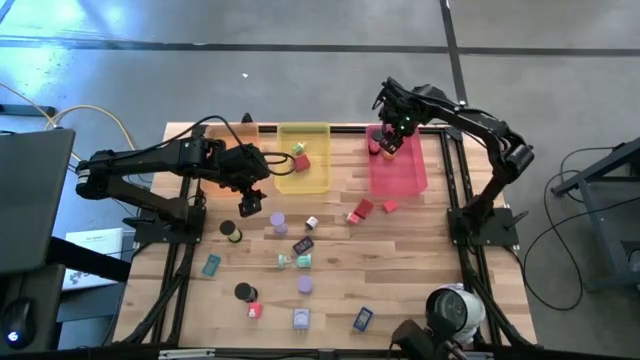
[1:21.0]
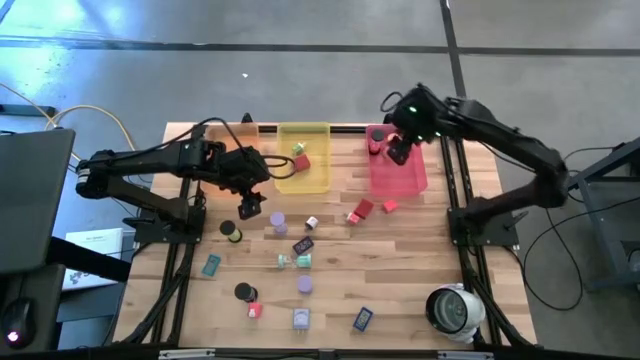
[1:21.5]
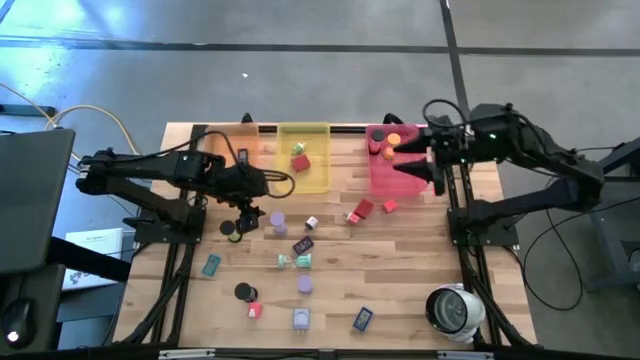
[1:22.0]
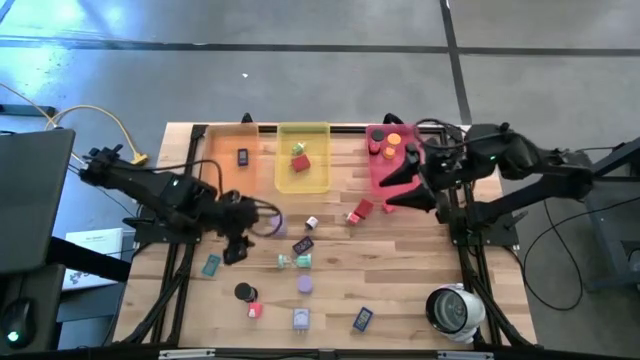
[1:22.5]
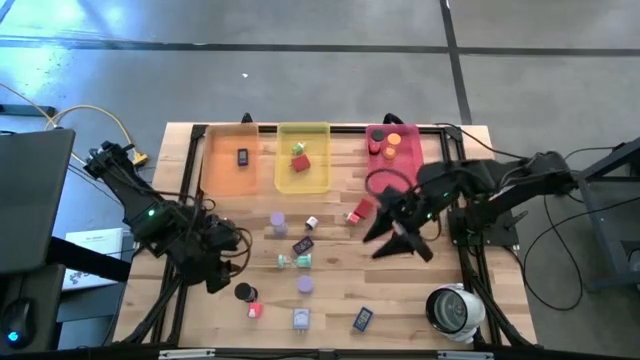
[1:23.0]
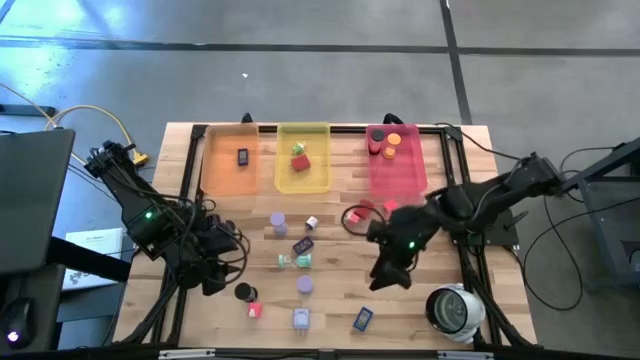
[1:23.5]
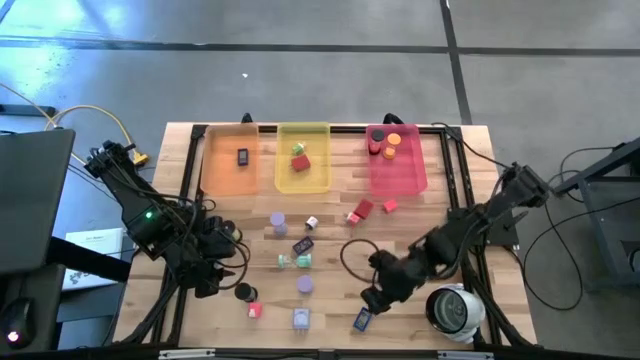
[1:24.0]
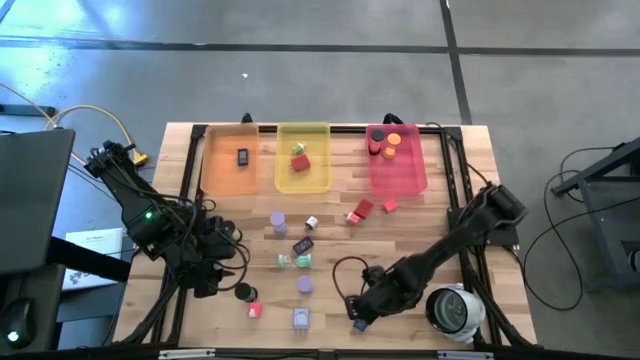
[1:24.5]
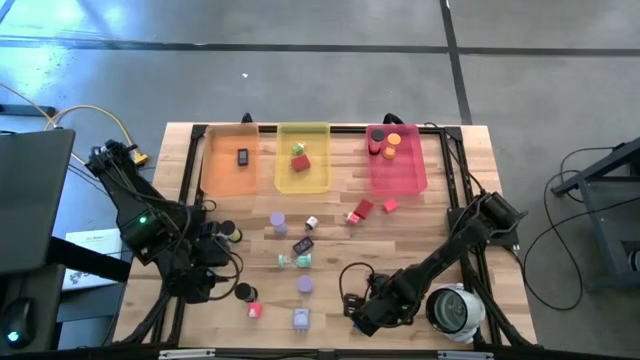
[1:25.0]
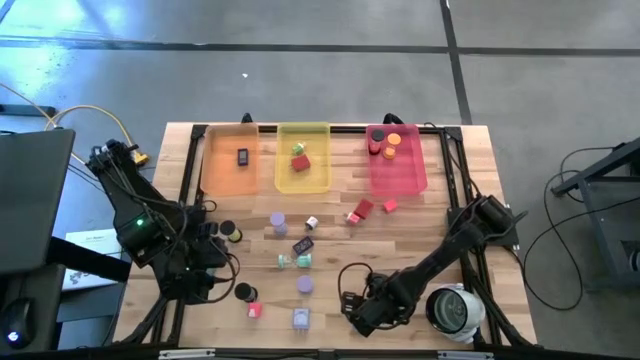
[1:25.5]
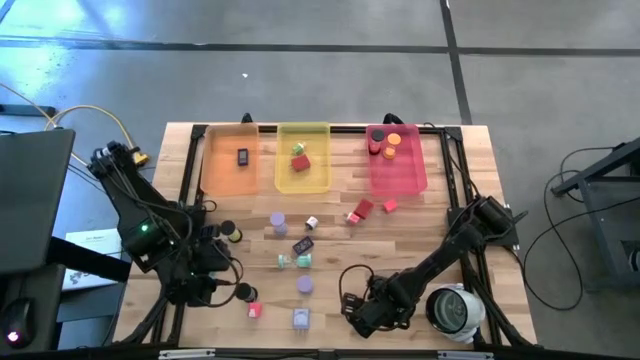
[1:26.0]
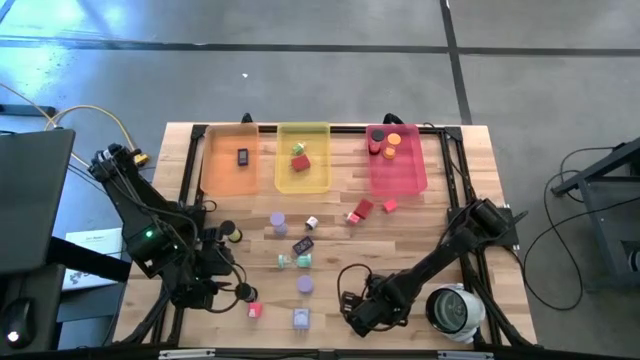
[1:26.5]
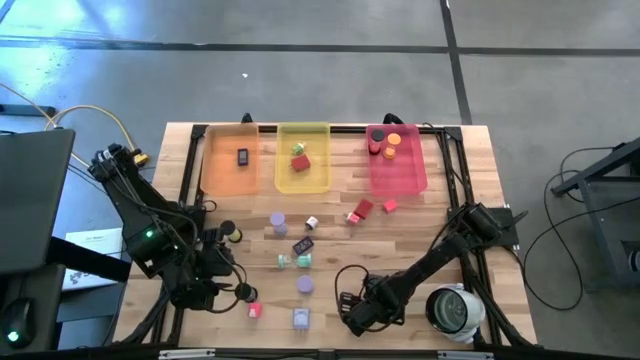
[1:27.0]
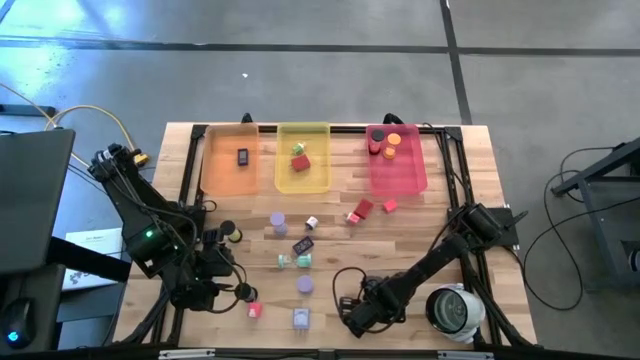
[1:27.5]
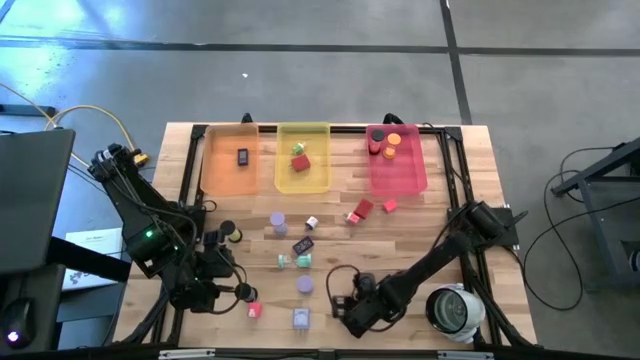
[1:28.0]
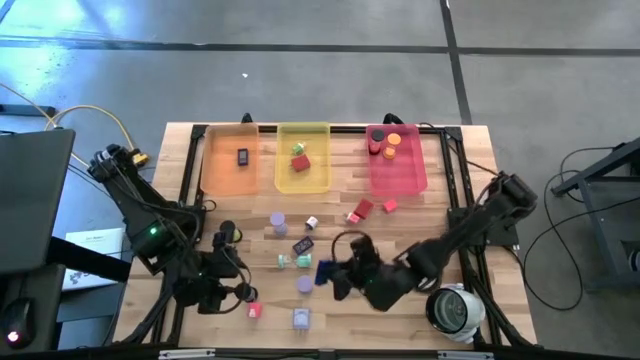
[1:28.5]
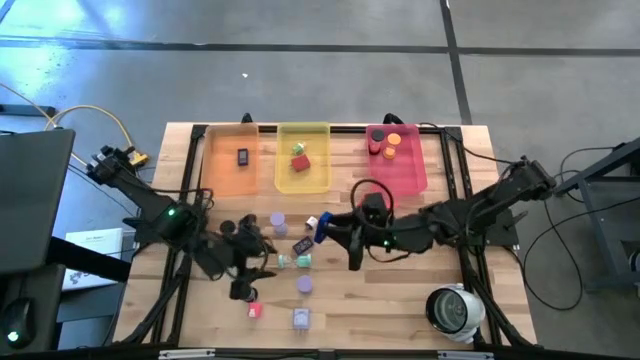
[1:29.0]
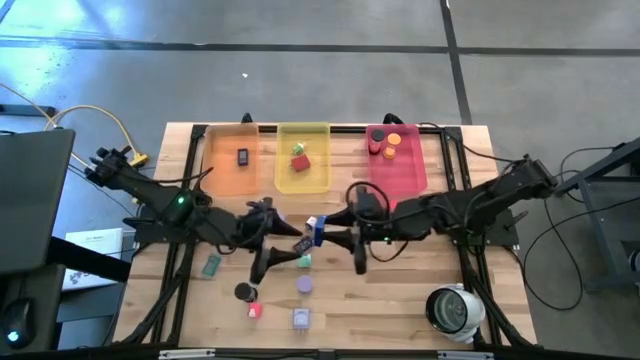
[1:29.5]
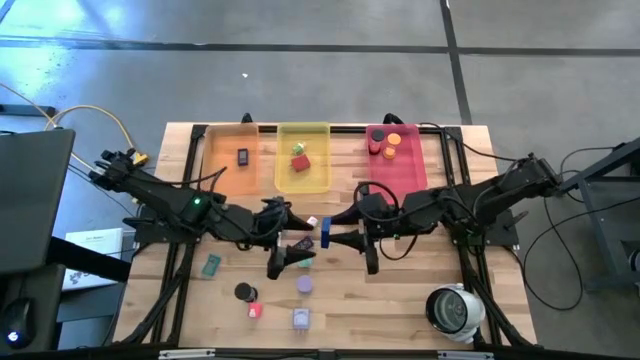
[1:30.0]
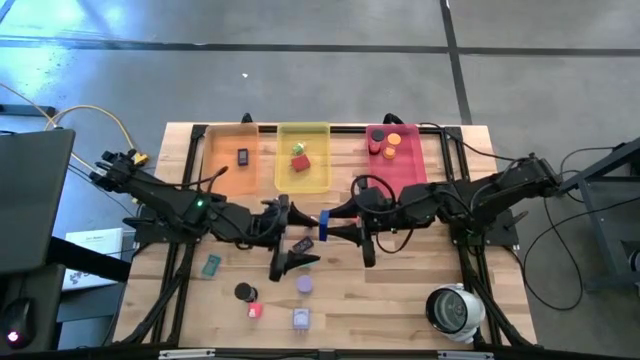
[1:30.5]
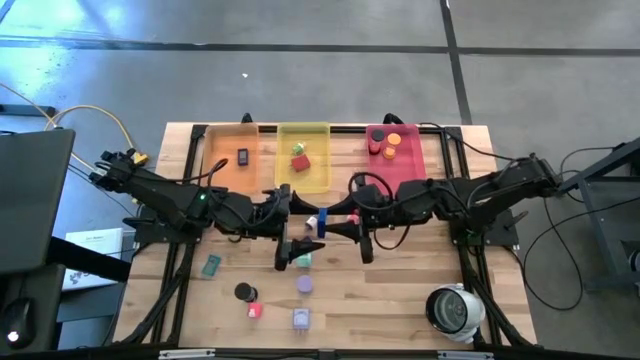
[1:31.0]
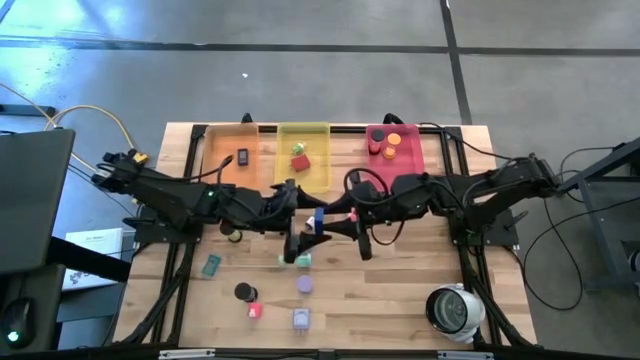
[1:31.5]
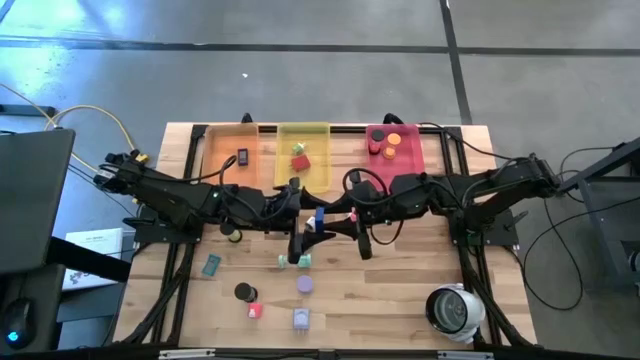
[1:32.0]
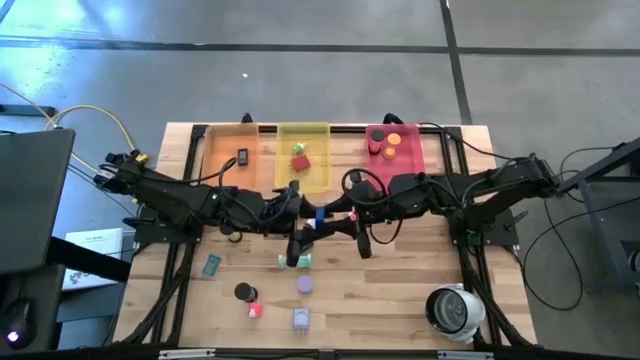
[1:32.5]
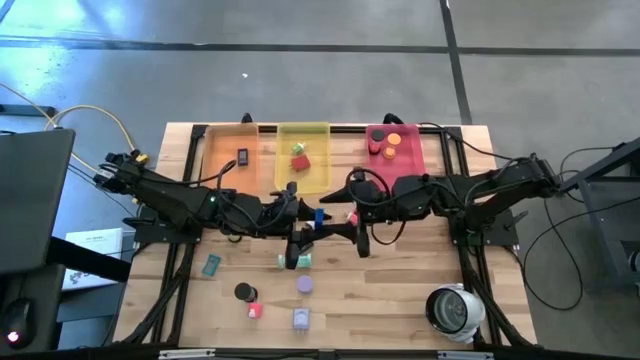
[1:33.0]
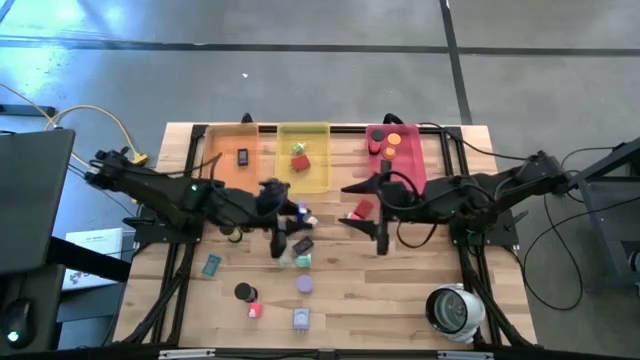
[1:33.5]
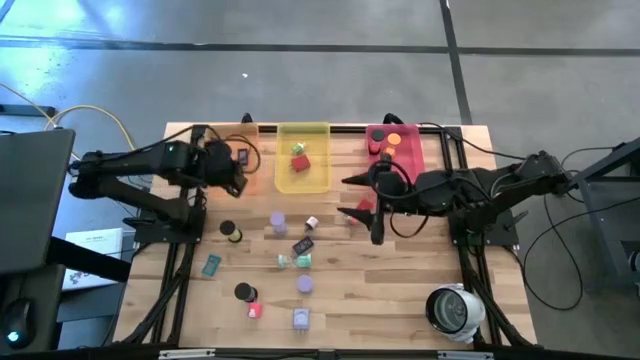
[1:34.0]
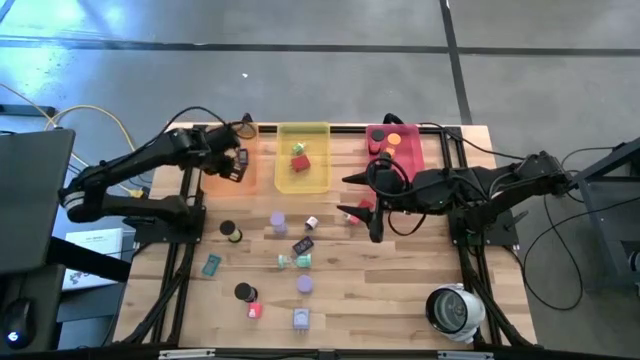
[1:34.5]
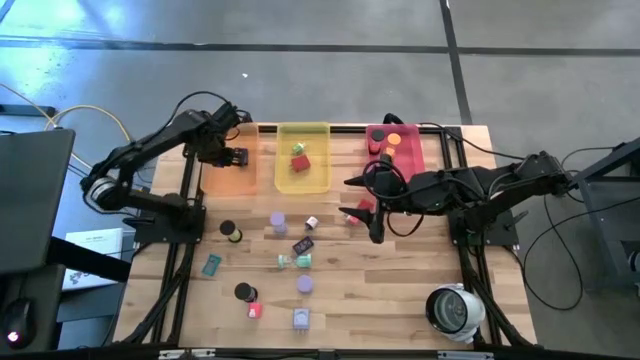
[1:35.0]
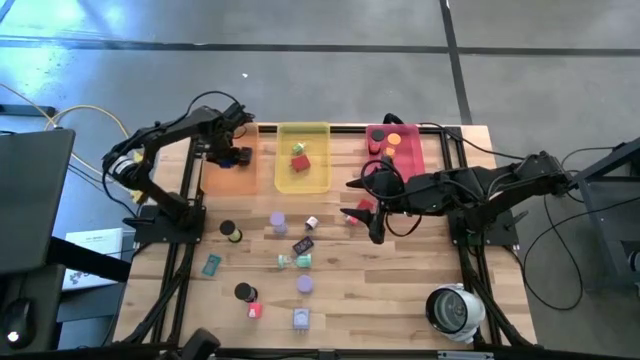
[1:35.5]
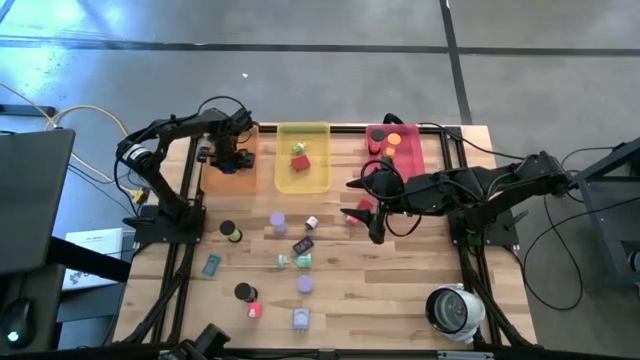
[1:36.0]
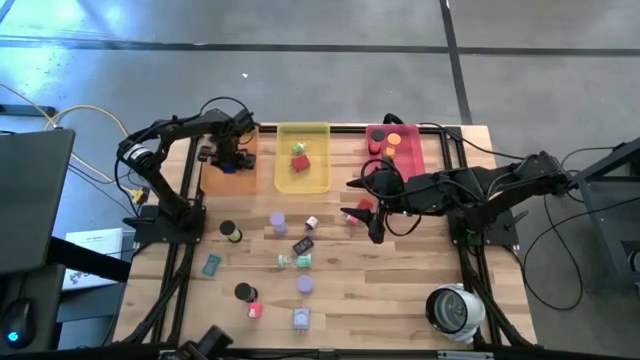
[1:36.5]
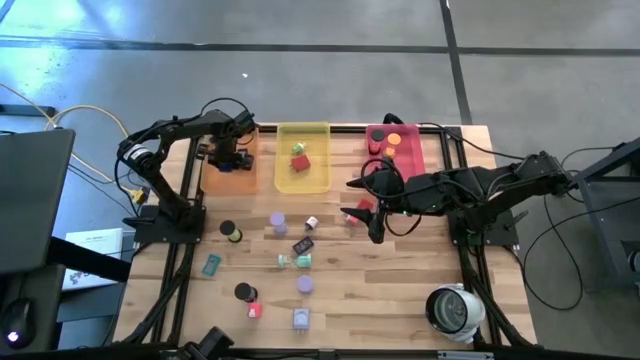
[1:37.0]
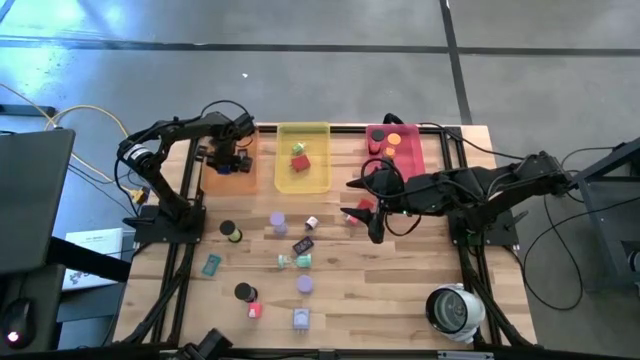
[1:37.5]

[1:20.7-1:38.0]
Task: Pick & Place Office items
Put the right blue digital clock into the orange bin
